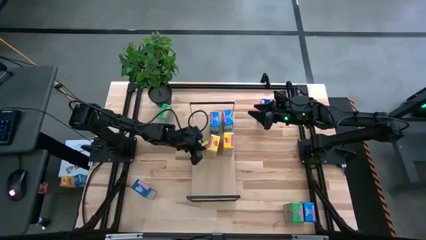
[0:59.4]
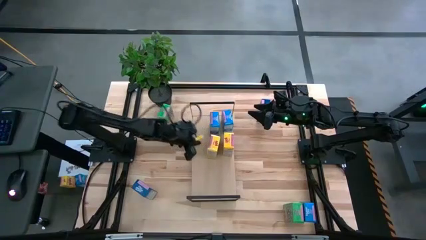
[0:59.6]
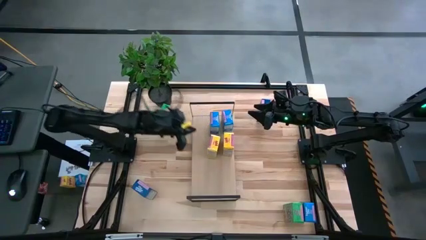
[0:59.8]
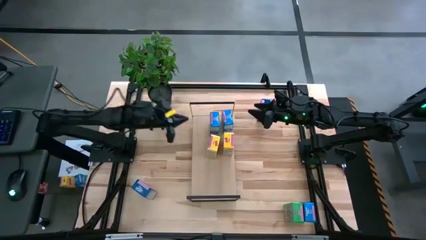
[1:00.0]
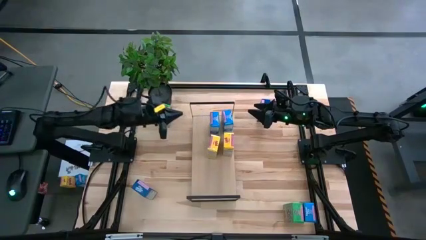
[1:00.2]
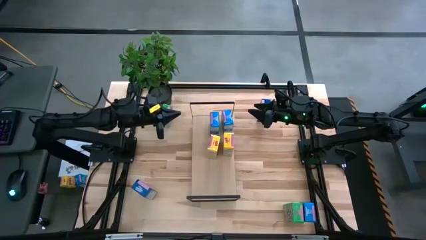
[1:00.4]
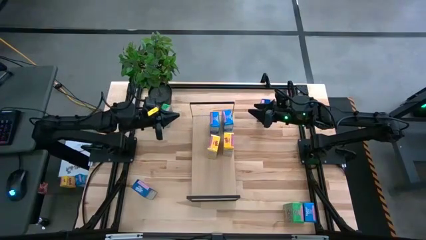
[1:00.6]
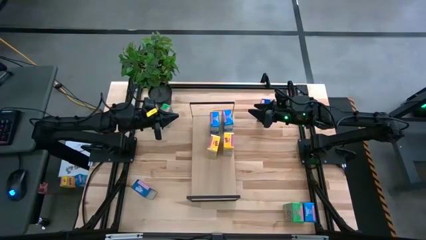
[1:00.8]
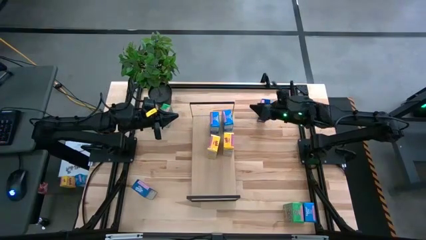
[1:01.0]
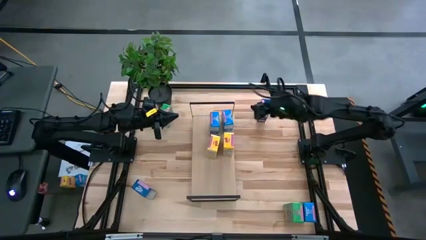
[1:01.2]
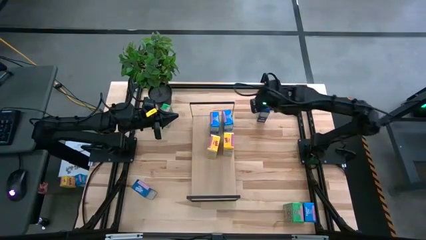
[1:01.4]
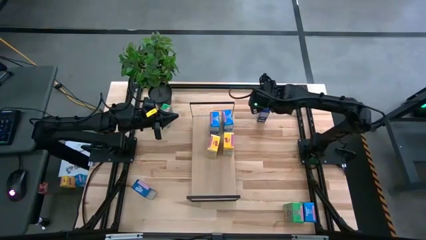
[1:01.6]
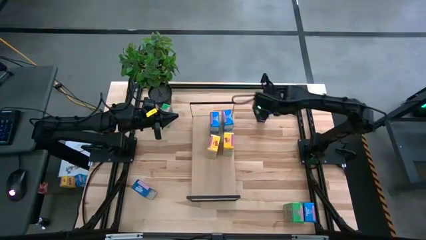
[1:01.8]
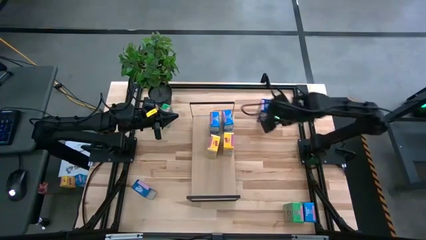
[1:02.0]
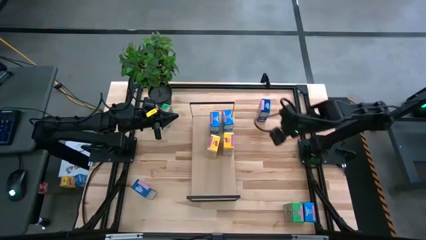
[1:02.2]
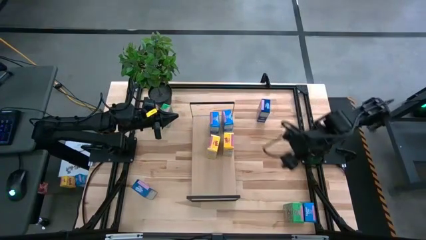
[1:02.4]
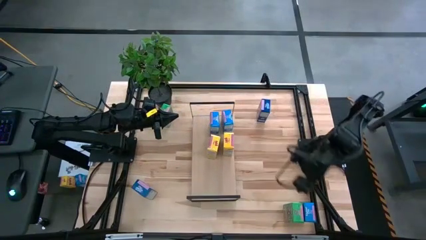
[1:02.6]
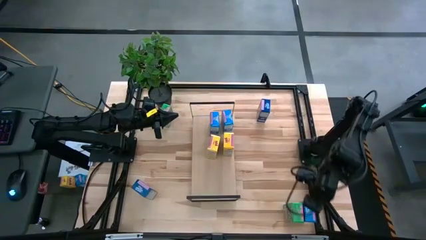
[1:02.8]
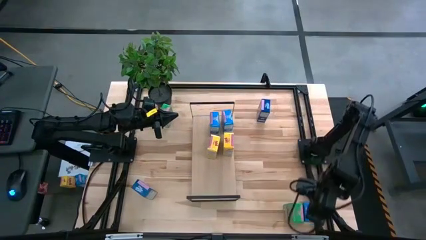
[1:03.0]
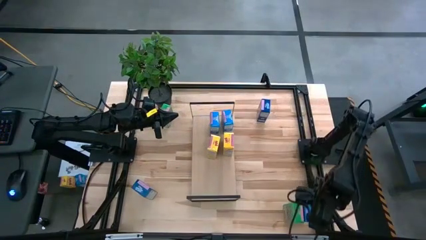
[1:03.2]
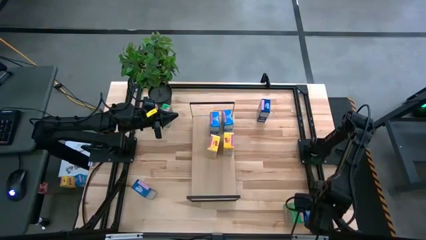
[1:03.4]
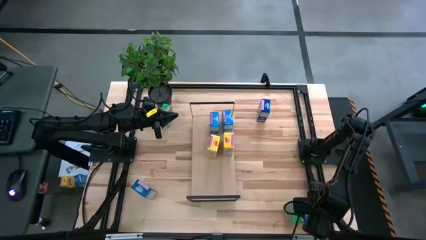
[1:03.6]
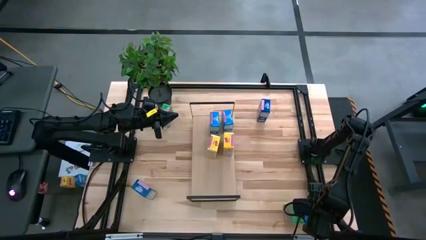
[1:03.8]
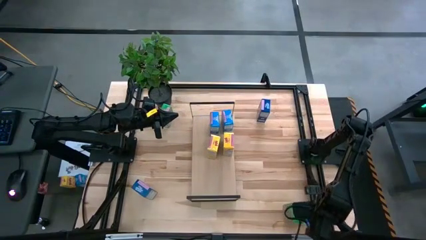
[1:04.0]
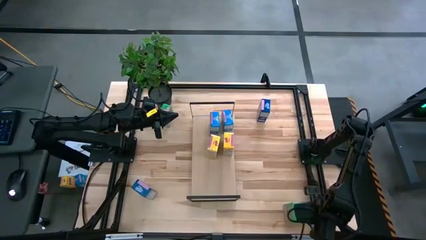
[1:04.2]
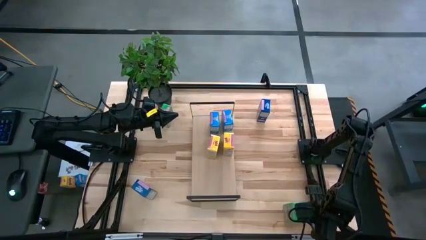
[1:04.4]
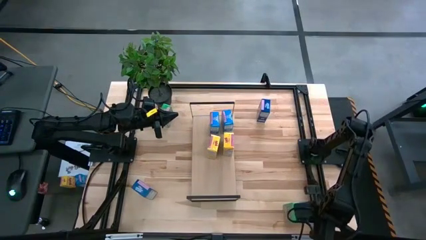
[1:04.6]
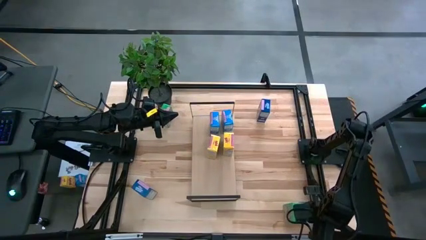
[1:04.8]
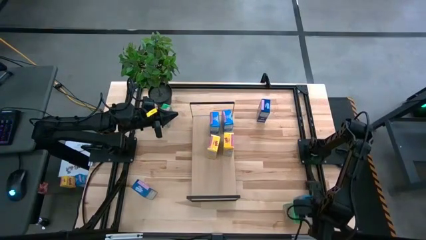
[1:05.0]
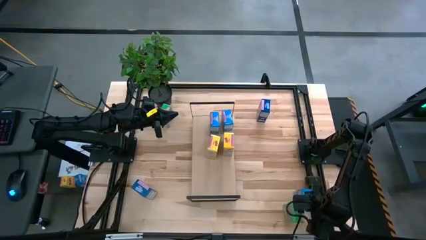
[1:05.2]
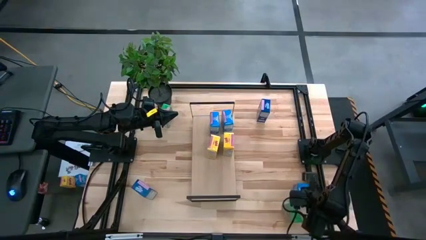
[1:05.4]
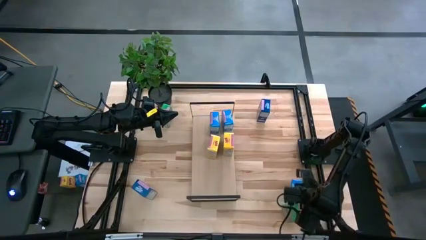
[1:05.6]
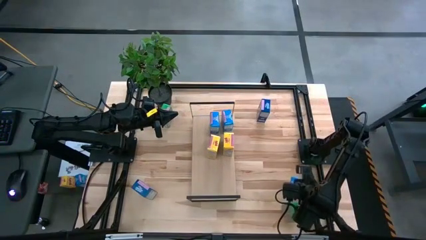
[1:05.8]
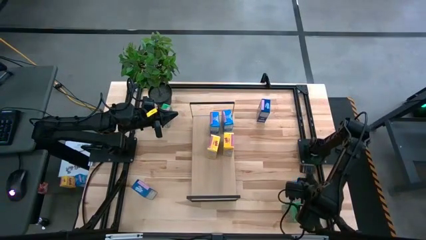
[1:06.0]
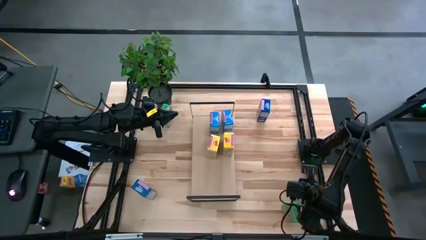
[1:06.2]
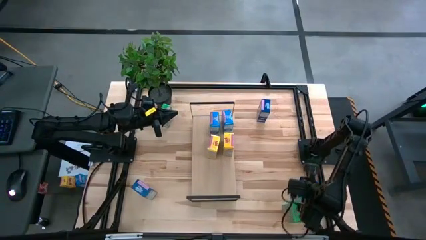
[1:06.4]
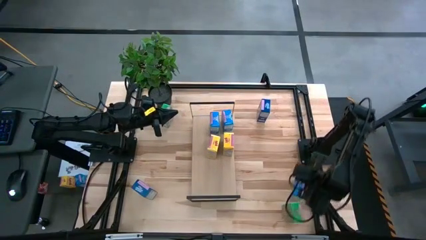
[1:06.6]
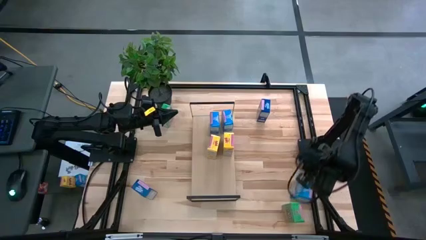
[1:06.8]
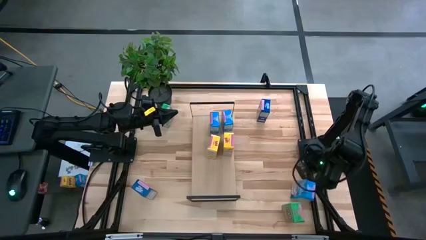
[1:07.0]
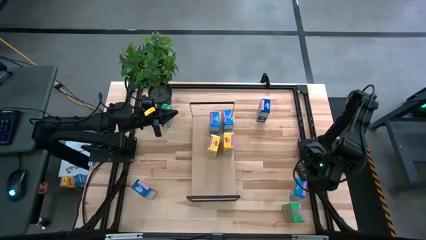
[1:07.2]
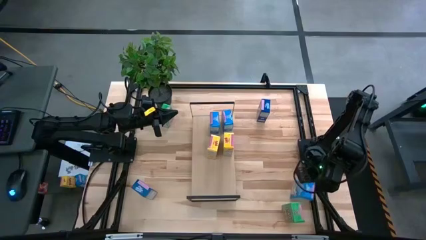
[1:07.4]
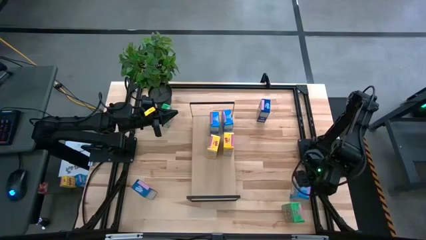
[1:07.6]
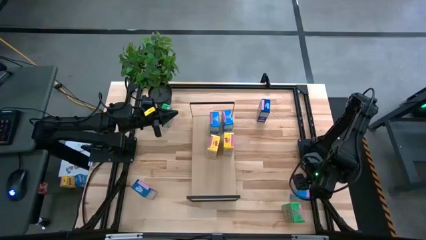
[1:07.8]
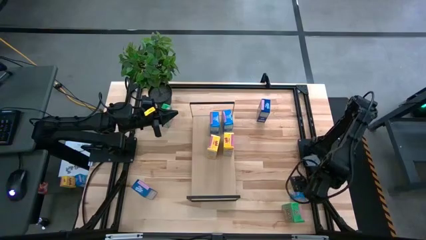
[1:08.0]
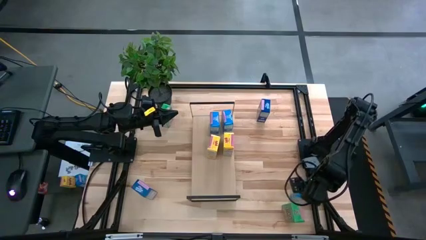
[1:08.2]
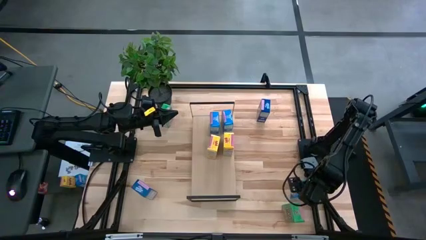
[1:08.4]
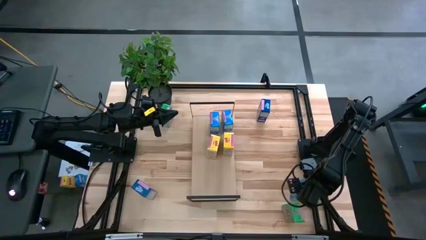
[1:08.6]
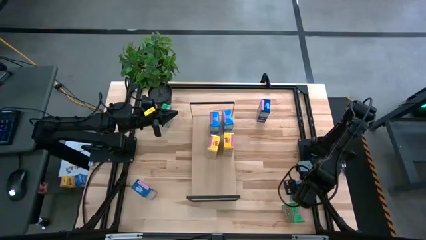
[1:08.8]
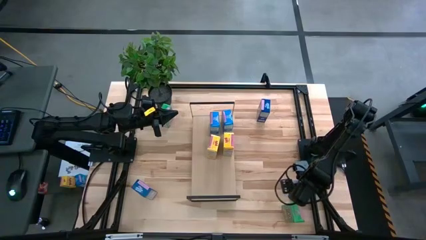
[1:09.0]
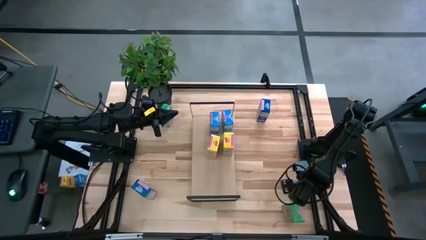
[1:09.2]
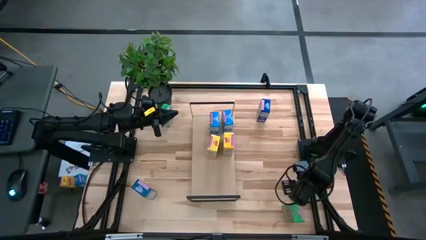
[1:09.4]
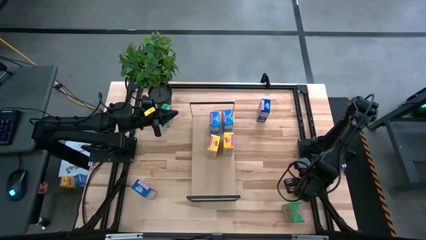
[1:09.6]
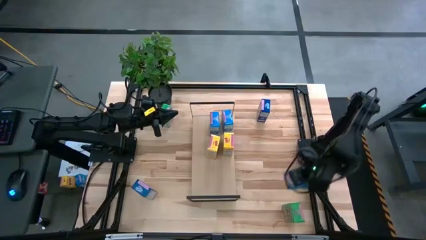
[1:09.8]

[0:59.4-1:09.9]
Task: Stack cereal on shelf
Put the light blue cereal box on the shelf aligned with the other light blue cereal boxes

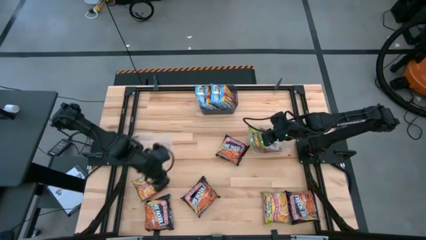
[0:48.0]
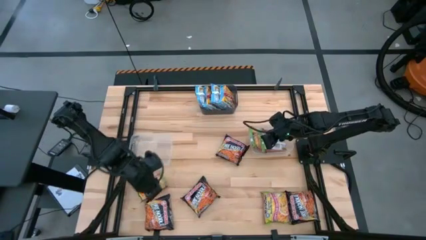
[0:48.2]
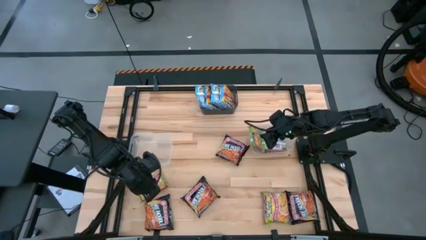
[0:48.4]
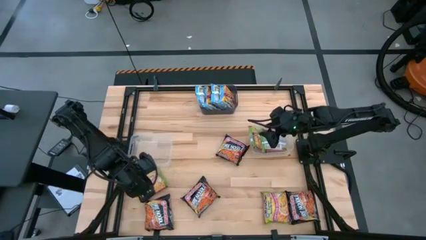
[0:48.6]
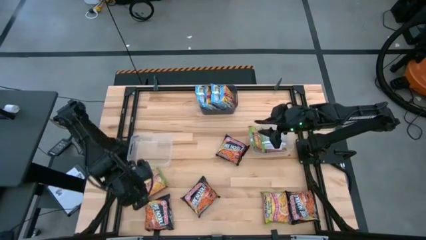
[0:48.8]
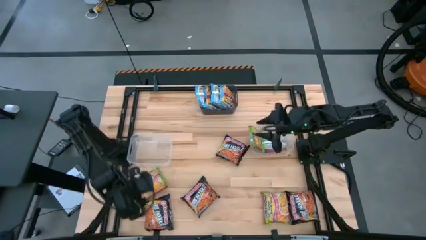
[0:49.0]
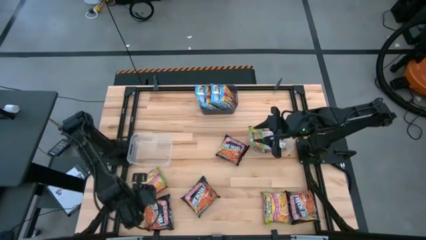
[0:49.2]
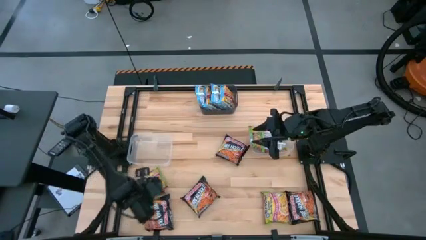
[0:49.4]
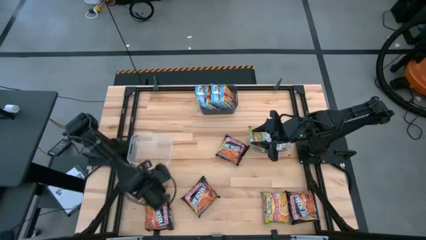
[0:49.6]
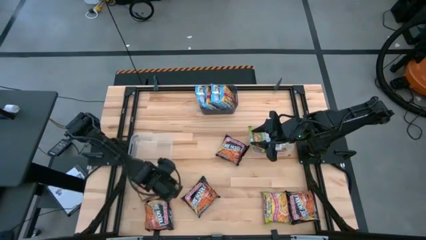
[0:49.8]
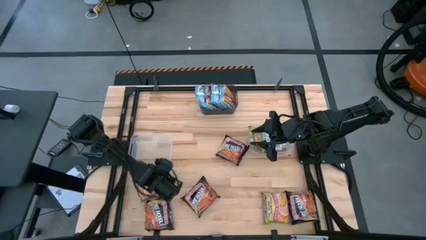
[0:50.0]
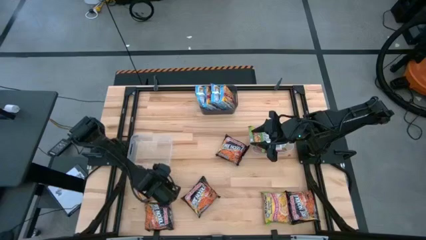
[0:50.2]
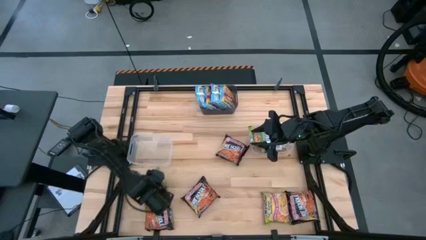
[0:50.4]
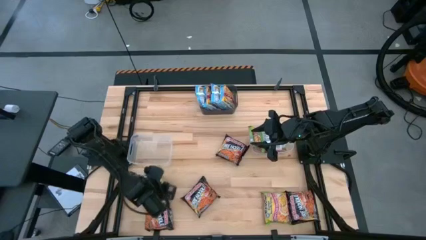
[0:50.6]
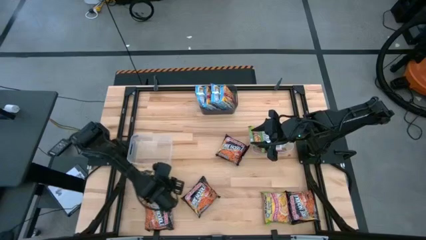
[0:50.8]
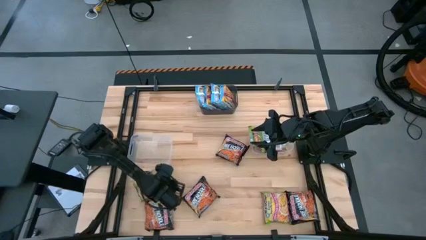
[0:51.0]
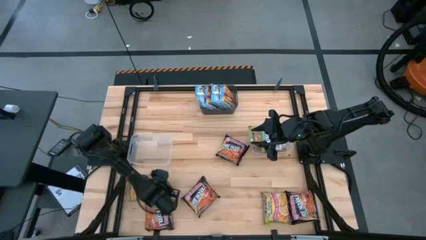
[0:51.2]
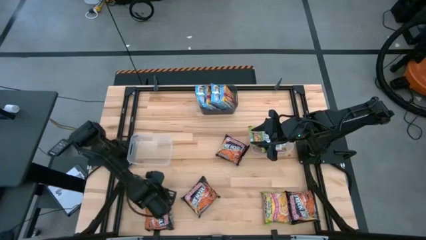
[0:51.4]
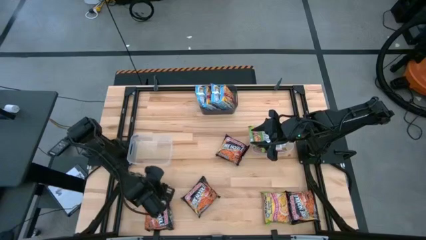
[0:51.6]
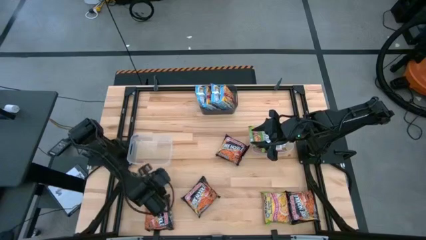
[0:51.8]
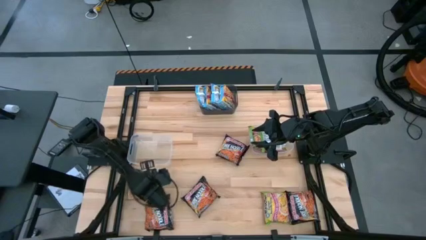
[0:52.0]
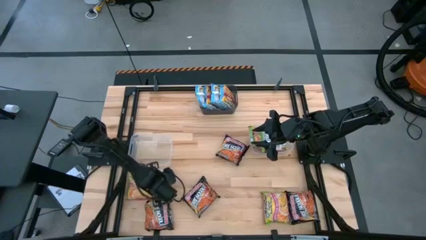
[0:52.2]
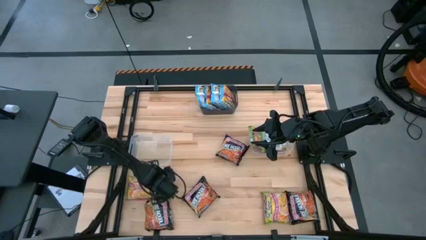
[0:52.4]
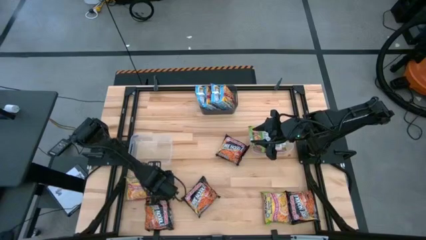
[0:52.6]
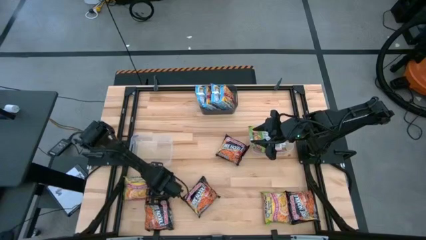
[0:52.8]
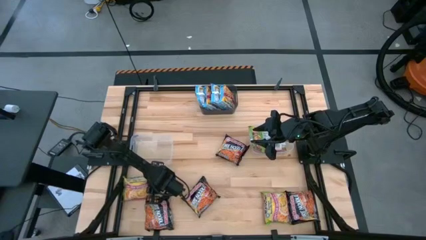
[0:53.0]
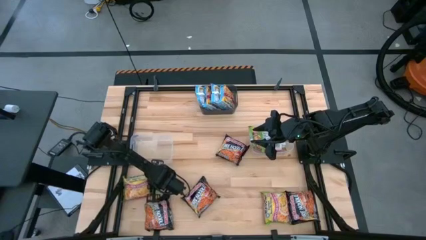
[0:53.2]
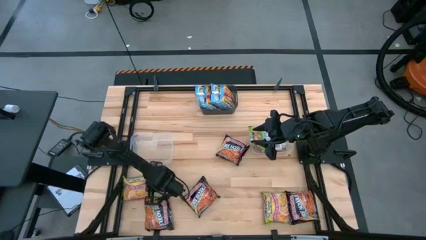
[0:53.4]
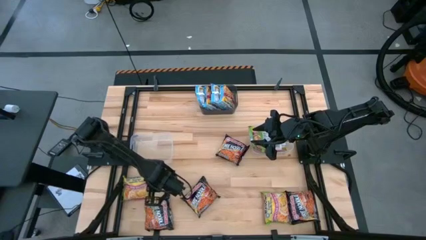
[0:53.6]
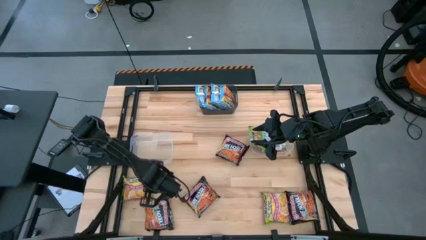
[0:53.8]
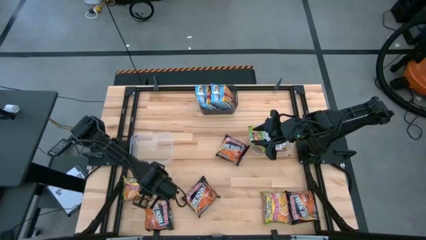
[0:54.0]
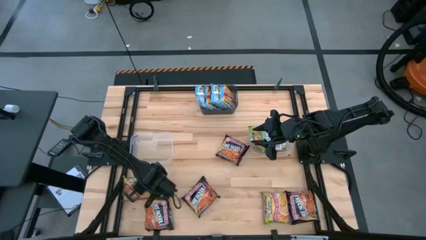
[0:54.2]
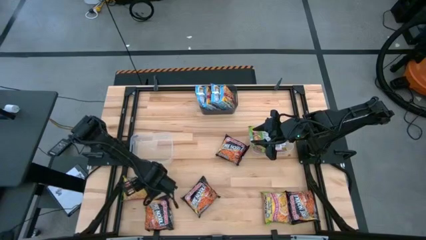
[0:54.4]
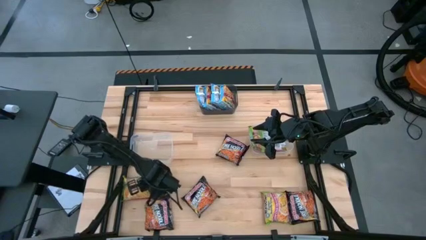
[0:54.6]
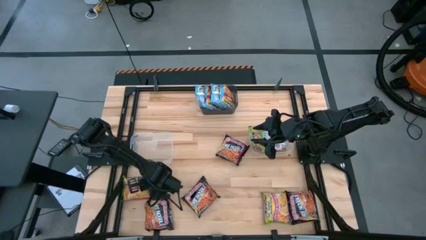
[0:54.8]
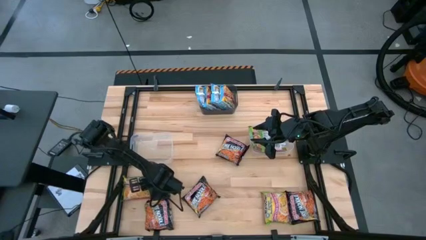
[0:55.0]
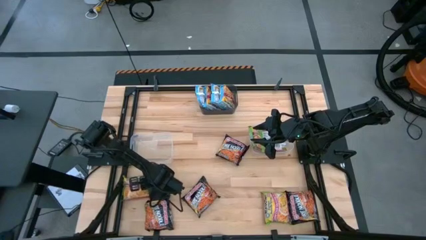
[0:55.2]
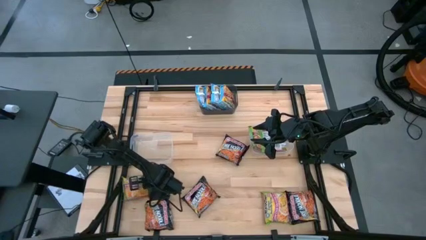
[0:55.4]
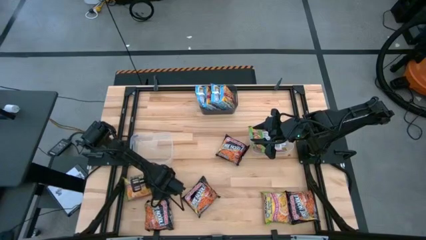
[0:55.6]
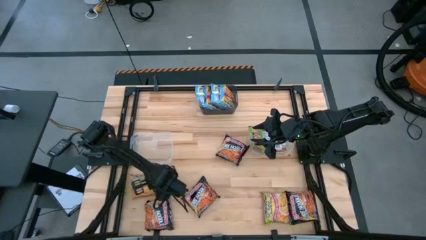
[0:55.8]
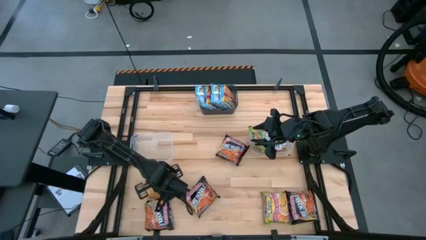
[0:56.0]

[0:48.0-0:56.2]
Task: Sort Maruchan noodles
Put the green noodle pack into the right transparent bin
